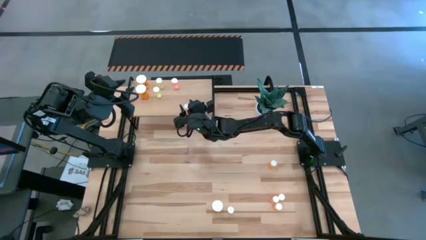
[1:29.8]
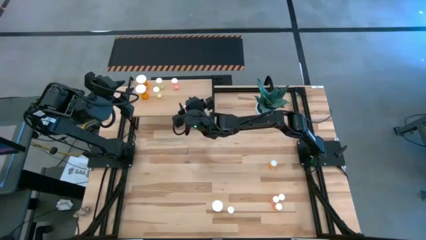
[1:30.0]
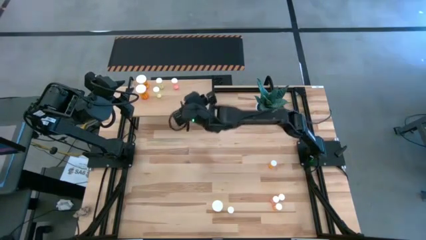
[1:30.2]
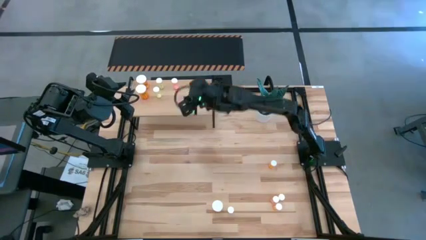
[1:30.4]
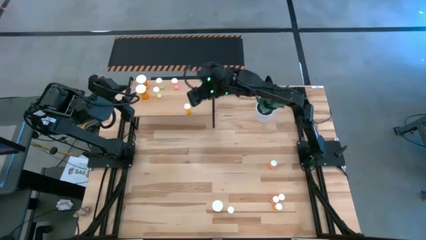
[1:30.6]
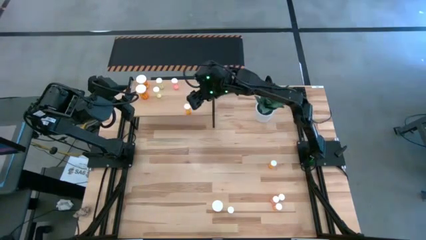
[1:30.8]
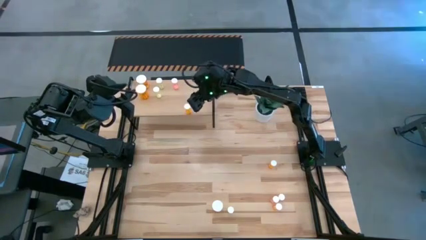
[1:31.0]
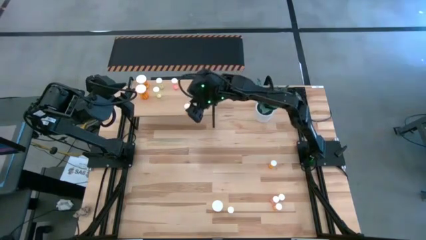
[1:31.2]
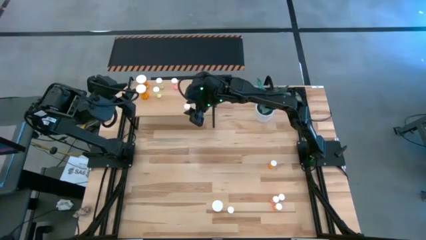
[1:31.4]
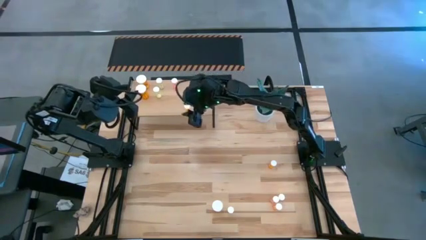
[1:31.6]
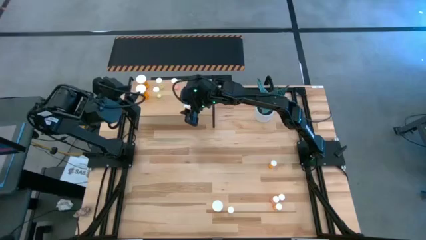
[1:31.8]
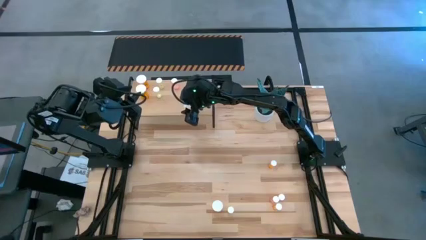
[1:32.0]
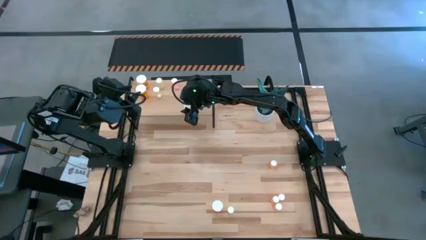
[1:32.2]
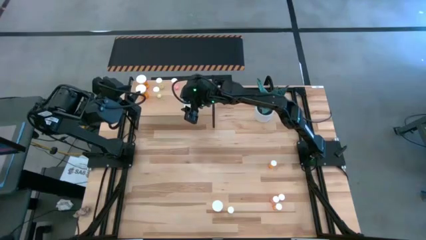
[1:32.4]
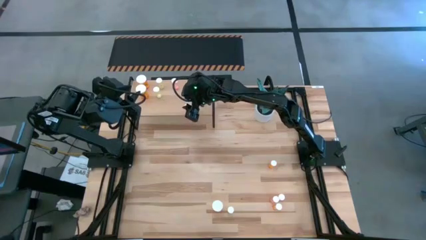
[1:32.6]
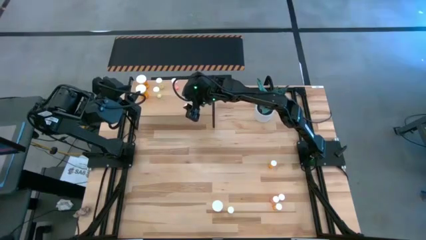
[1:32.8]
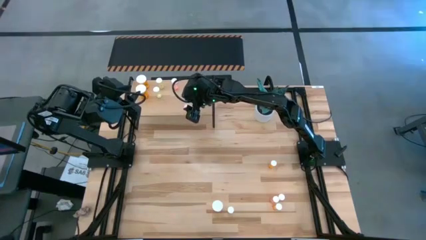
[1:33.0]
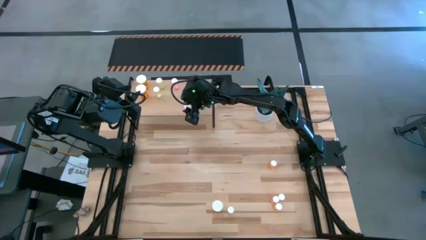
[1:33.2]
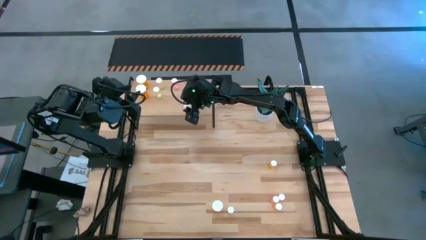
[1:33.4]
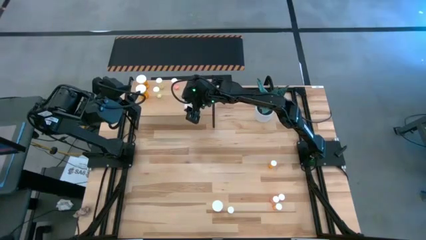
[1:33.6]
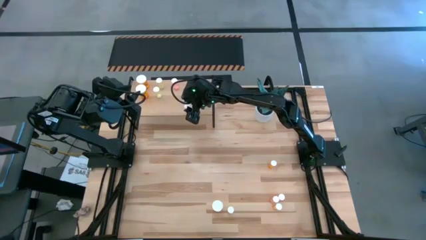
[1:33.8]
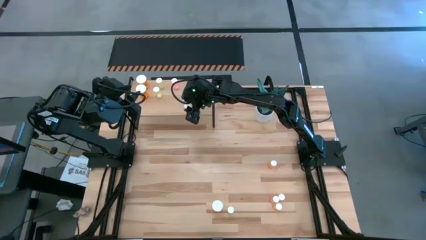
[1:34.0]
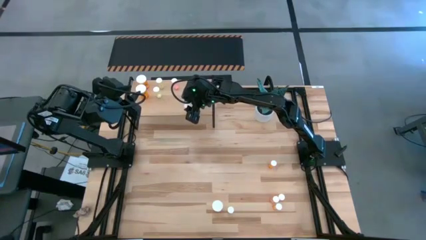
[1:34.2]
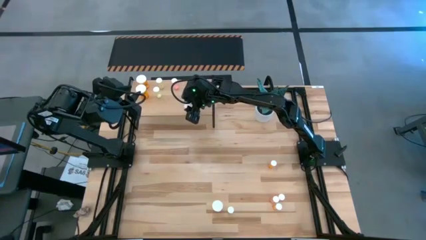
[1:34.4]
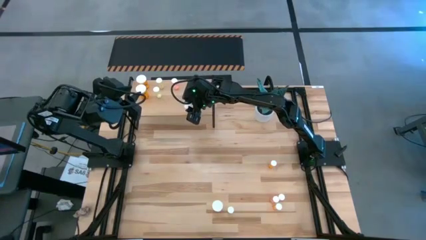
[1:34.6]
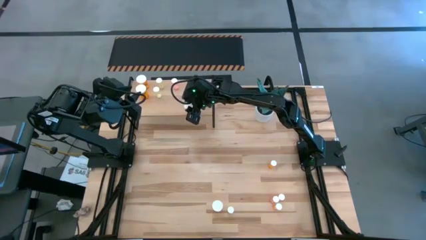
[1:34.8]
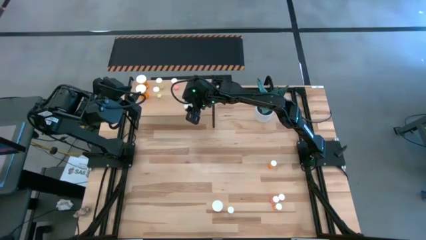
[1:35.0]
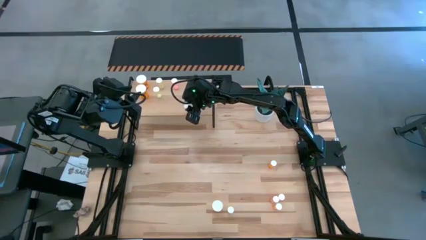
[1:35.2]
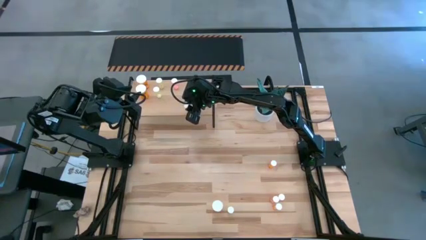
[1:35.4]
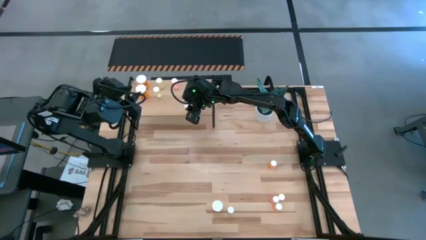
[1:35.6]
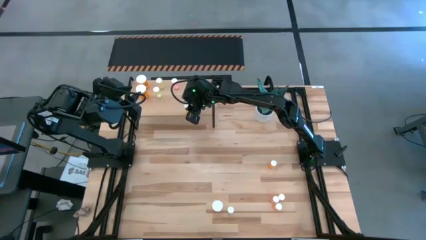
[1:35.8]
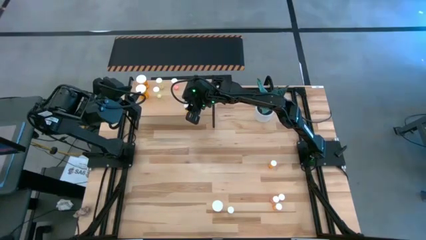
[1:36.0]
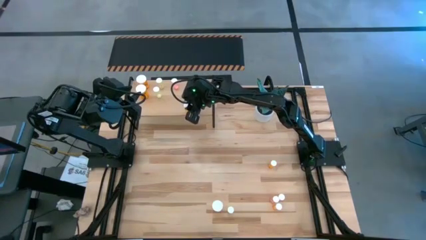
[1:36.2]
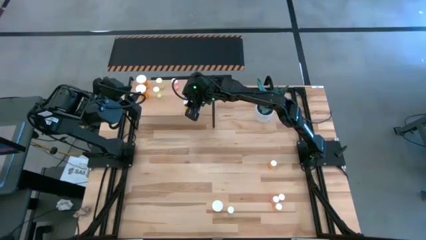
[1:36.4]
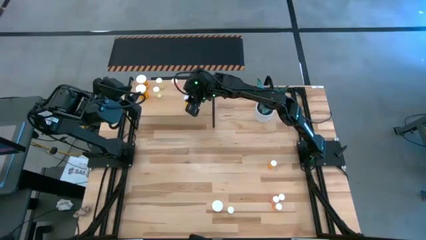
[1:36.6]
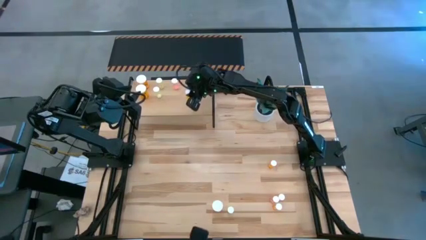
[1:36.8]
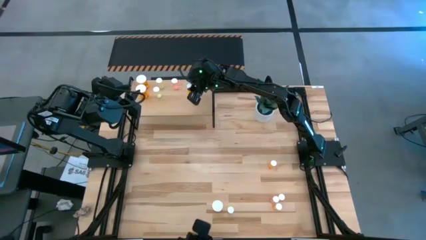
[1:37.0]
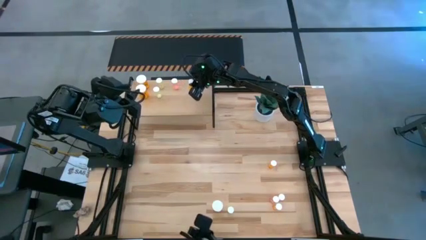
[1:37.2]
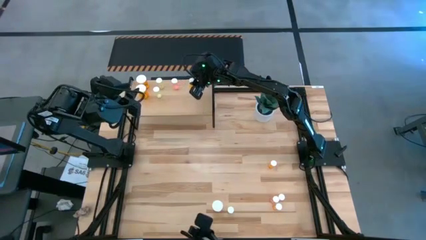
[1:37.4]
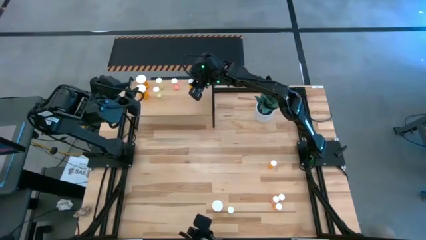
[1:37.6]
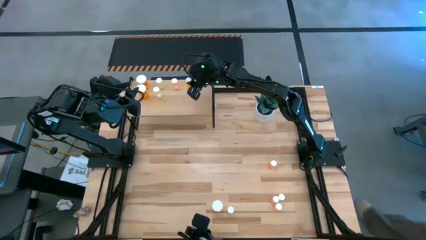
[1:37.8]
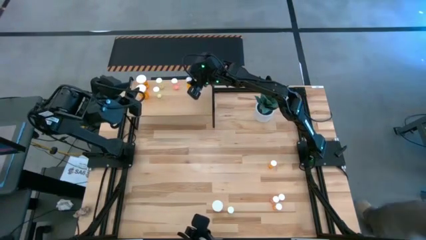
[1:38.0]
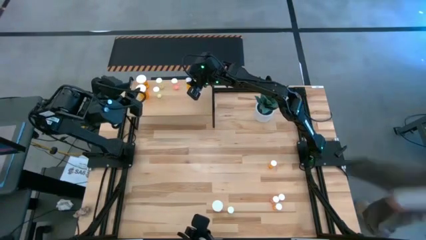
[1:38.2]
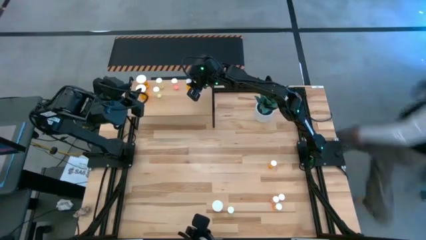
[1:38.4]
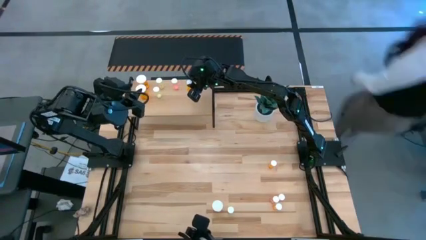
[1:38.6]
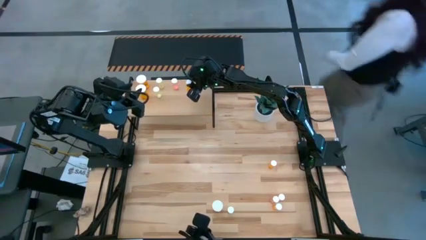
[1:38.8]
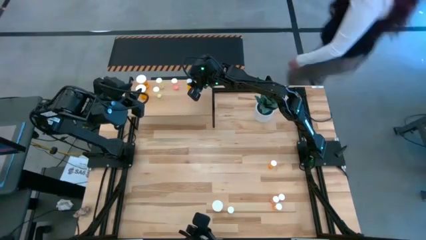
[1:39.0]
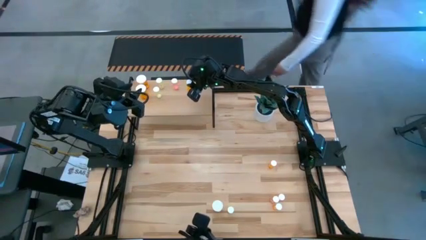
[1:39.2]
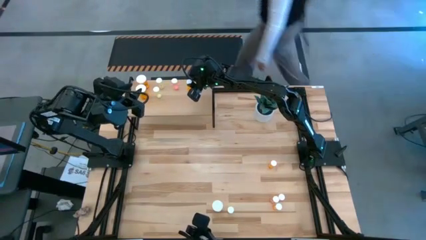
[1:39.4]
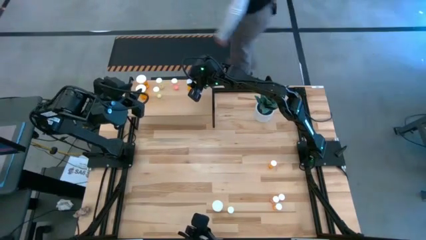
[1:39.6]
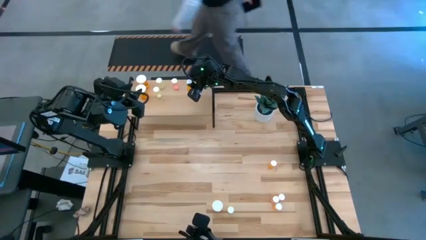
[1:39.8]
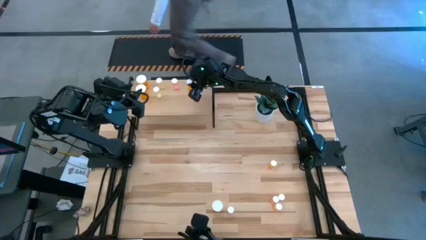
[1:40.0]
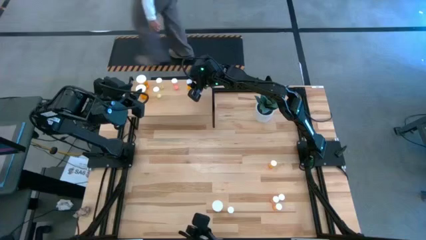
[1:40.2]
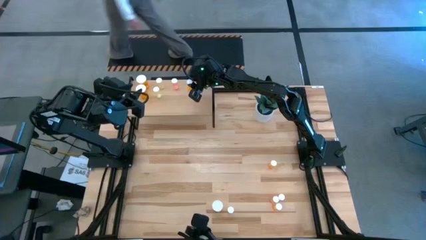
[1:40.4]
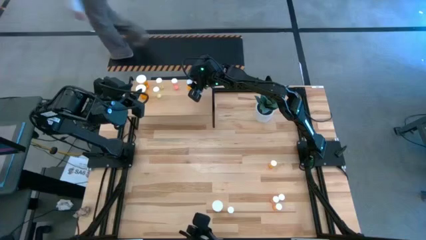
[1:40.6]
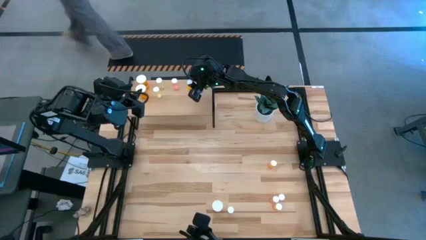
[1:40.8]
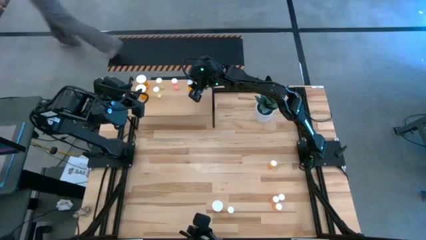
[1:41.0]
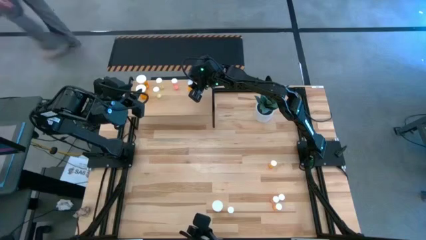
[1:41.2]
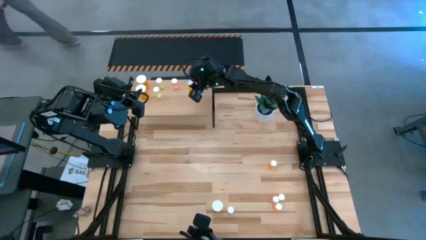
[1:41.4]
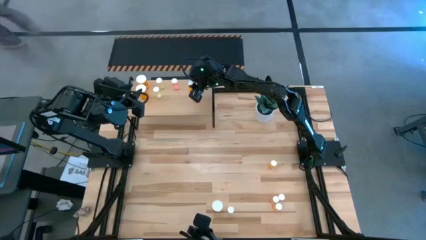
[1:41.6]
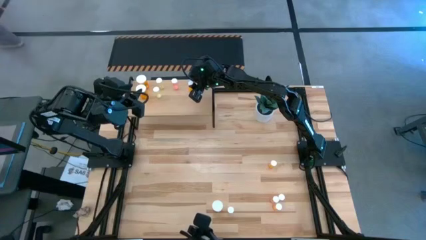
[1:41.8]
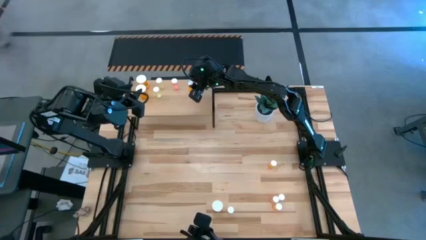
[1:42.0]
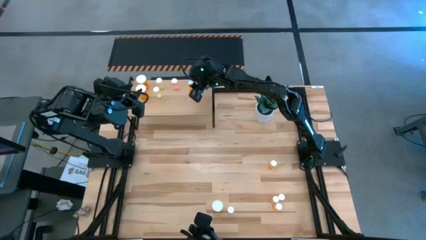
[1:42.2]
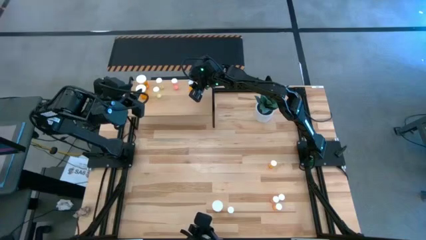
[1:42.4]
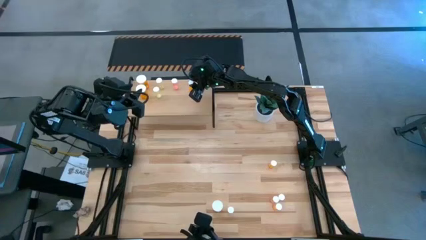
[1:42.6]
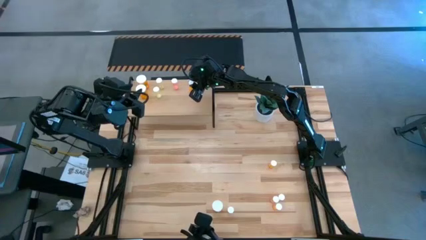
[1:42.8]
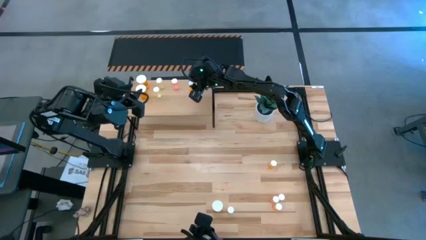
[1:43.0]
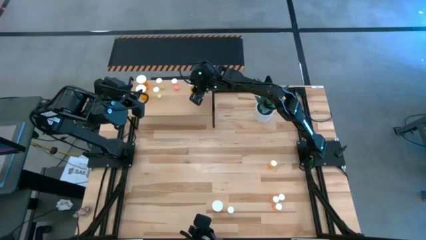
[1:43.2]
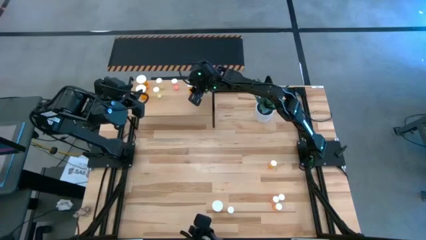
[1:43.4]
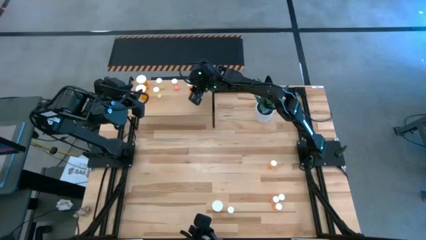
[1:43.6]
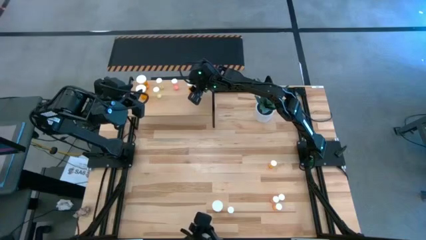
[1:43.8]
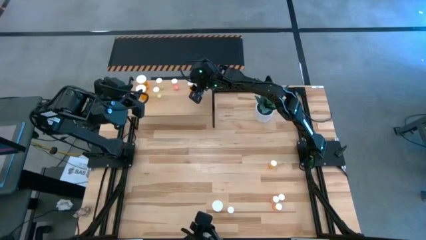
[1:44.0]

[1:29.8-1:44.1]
Task: Pick and place medicine bottles onto shelf by color
Put the top small orange pill bottle on the shelf
